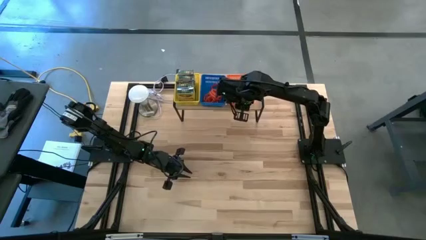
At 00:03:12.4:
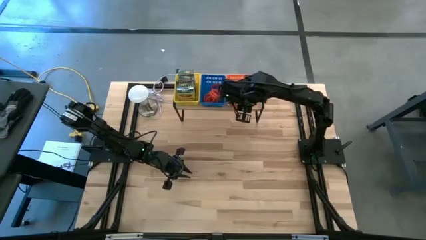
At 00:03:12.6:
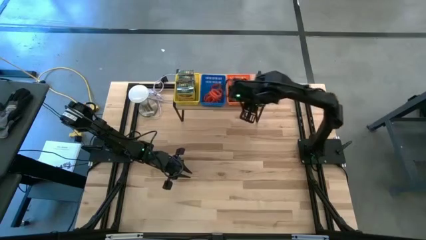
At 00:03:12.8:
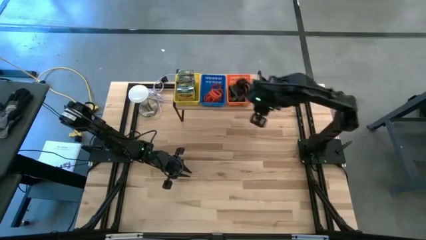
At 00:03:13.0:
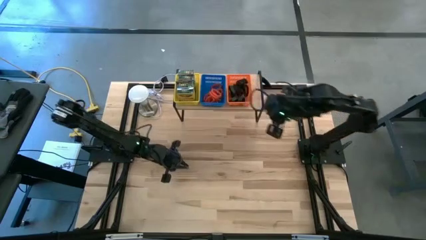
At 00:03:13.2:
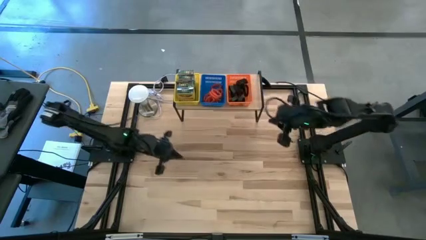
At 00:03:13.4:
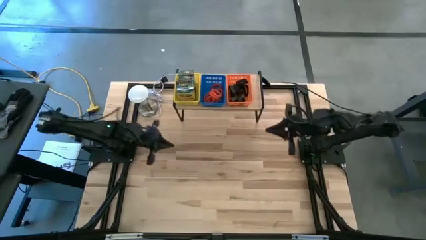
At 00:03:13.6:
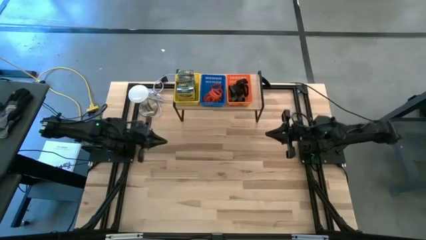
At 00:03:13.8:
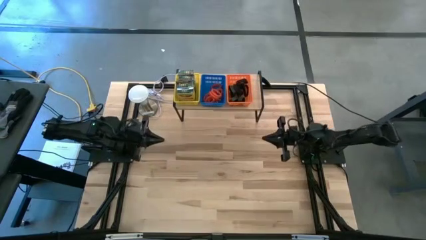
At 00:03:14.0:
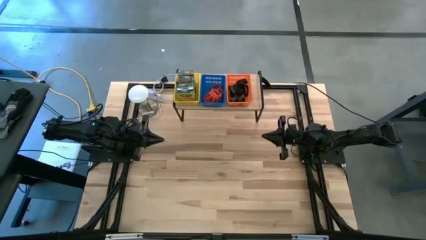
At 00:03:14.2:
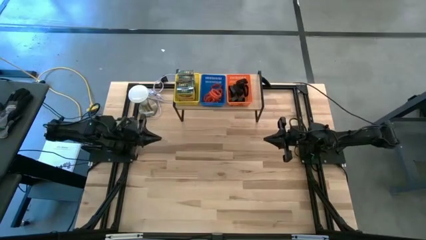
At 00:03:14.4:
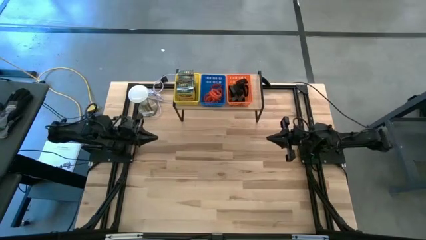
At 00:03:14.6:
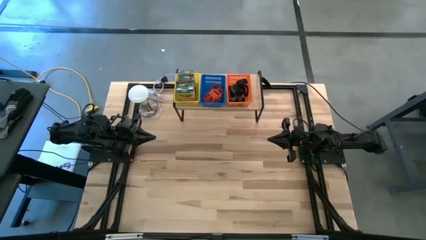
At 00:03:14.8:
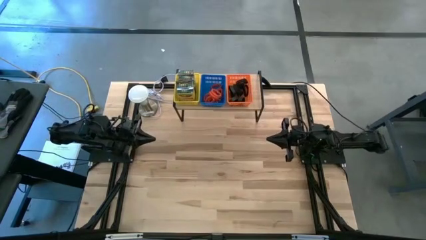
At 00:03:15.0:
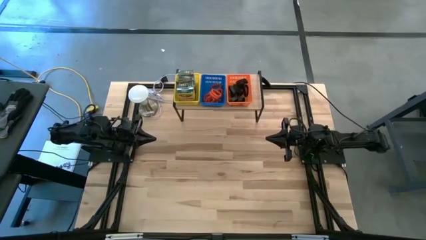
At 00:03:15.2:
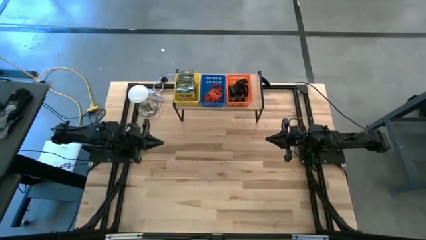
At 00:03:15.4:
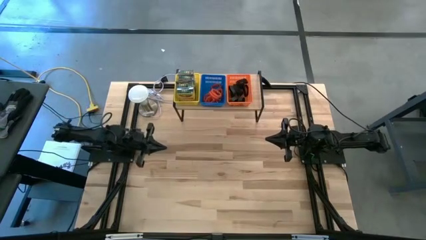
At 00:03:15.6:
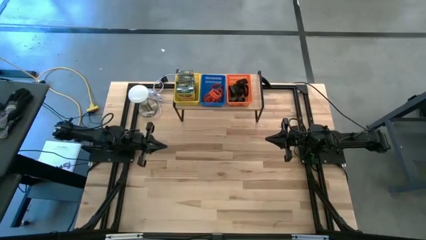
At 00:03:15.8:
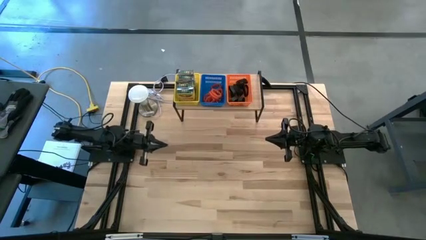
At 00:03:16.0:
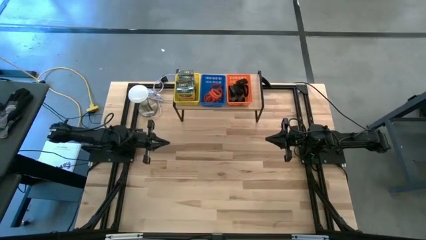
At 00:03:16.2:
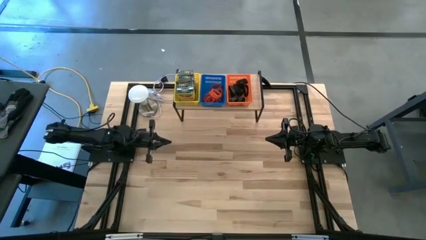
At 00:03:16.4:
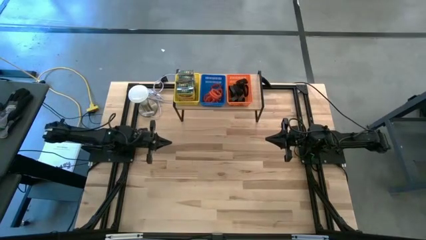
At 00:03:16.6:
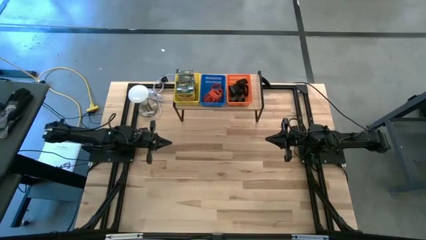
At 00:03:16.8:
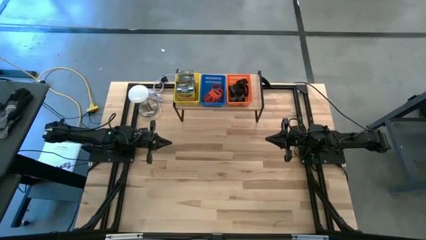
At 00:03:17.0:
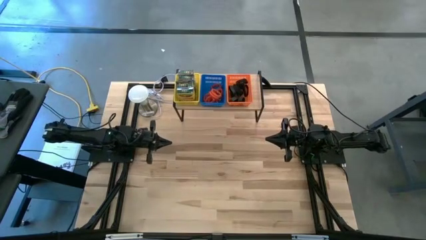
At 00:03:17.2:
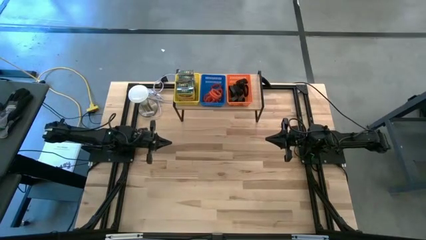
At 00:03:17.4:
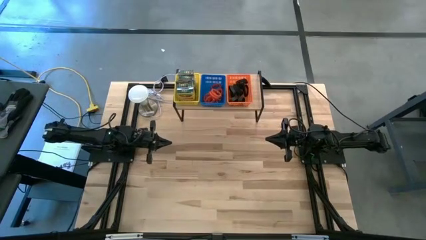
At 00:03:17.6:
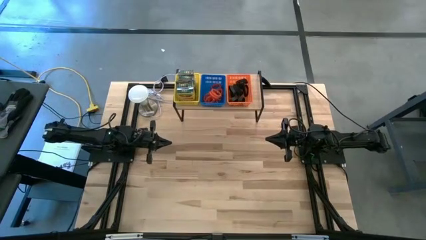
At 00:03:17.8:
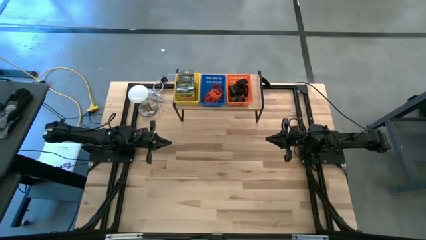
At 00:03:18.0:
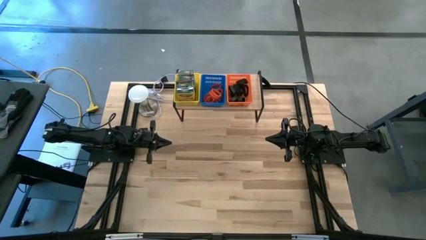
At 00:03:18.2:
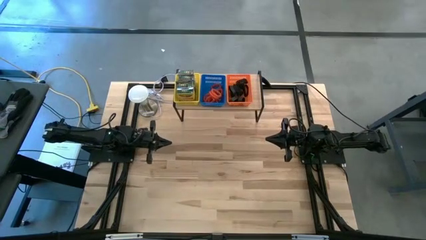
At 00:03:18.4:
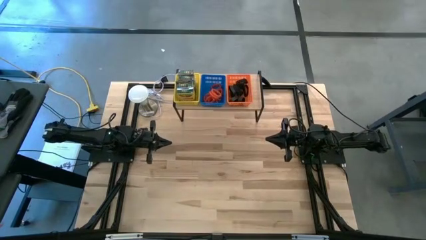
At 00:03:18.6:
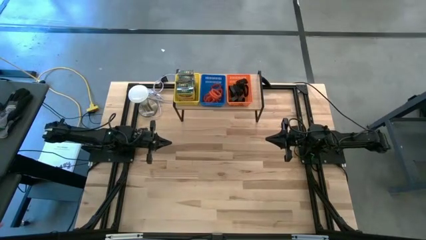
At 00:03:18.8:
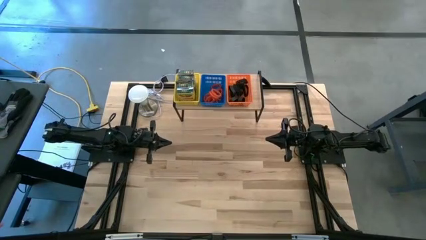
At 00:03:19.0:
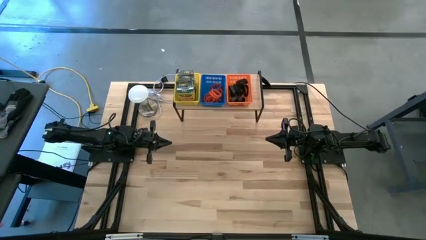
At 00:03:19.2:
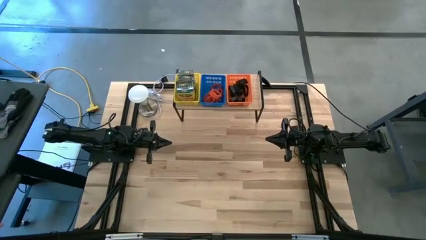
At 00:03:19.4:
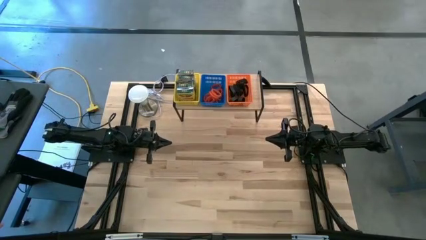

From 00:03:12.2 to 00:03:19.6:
Task: Pick & Place Office Desk Supplies
Return to Home Position

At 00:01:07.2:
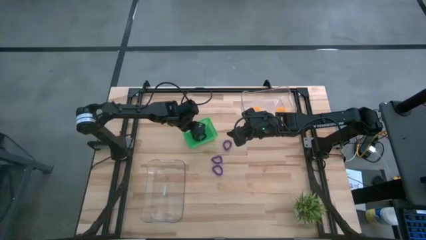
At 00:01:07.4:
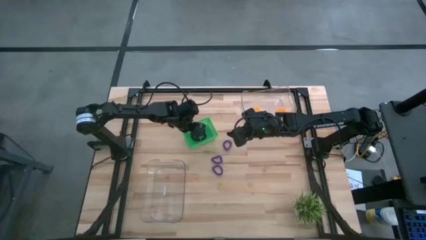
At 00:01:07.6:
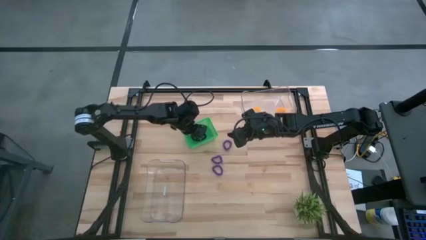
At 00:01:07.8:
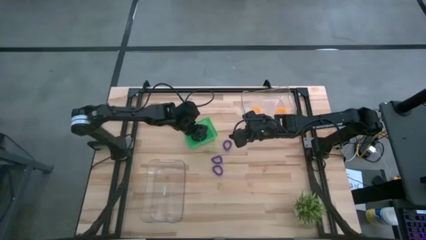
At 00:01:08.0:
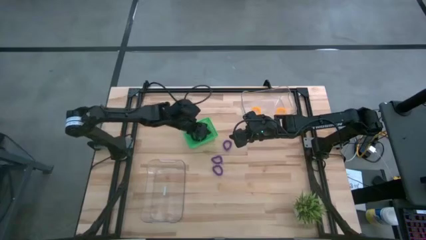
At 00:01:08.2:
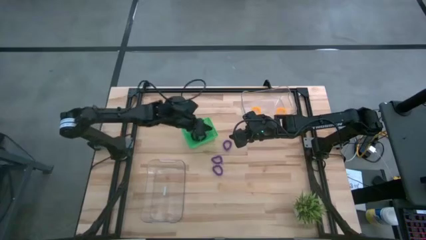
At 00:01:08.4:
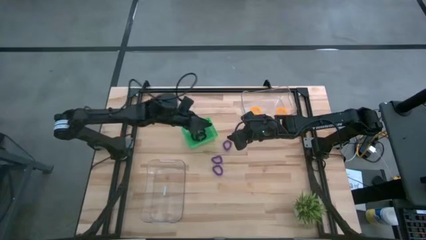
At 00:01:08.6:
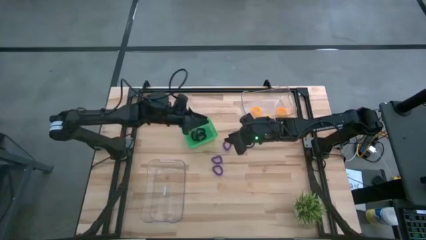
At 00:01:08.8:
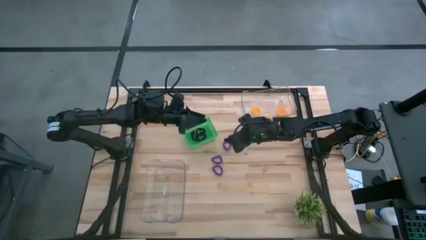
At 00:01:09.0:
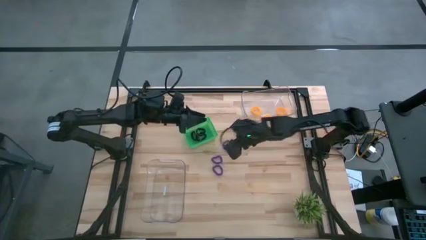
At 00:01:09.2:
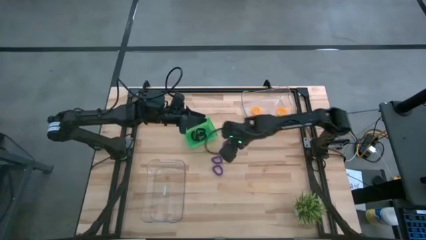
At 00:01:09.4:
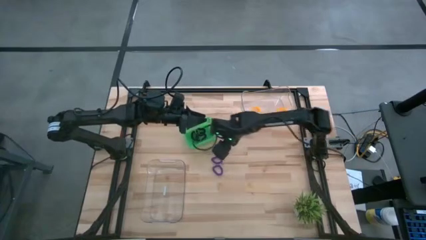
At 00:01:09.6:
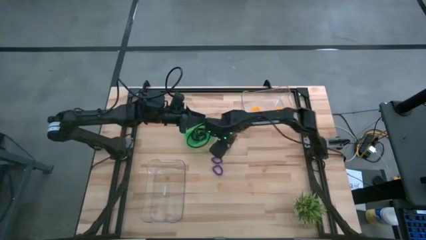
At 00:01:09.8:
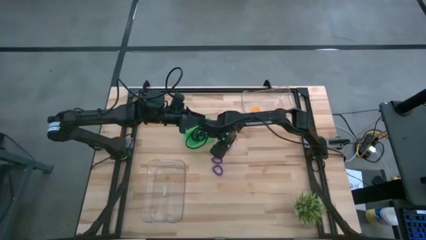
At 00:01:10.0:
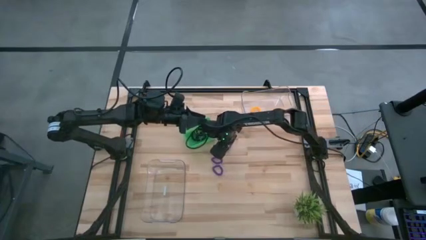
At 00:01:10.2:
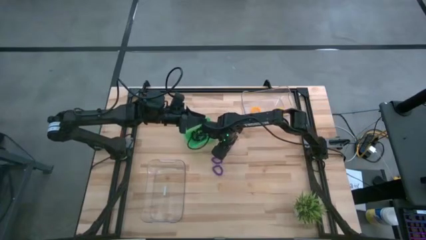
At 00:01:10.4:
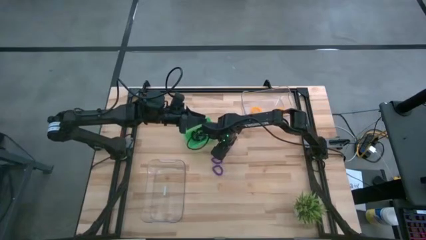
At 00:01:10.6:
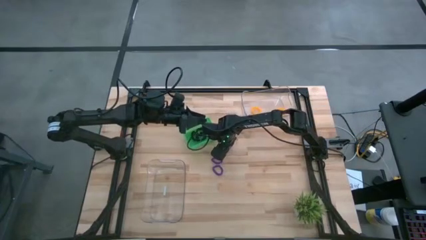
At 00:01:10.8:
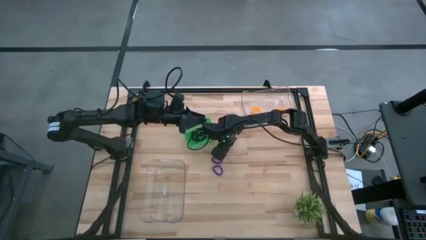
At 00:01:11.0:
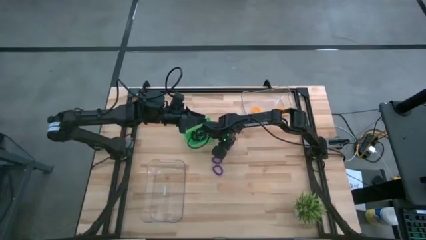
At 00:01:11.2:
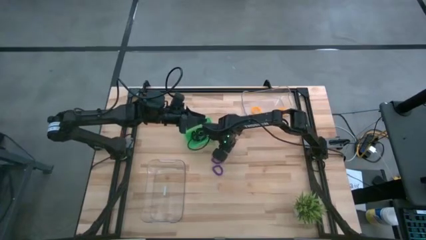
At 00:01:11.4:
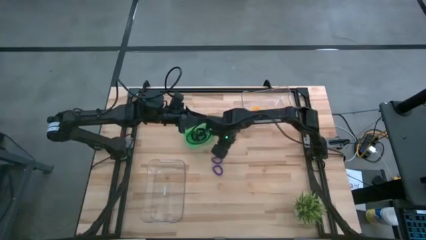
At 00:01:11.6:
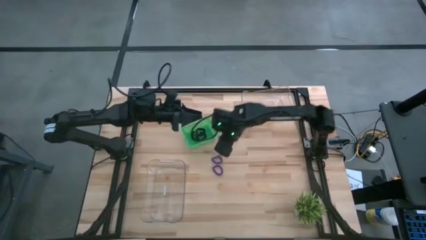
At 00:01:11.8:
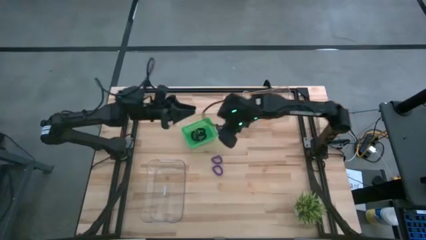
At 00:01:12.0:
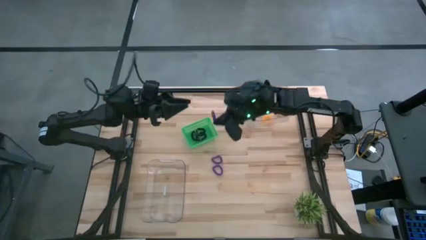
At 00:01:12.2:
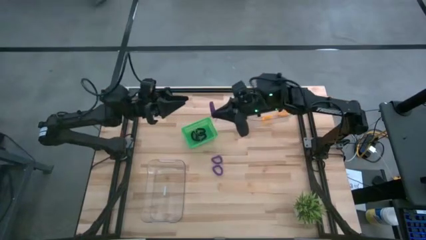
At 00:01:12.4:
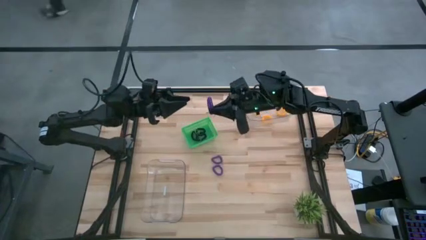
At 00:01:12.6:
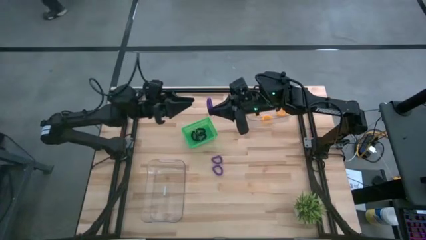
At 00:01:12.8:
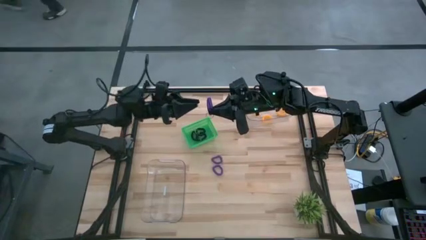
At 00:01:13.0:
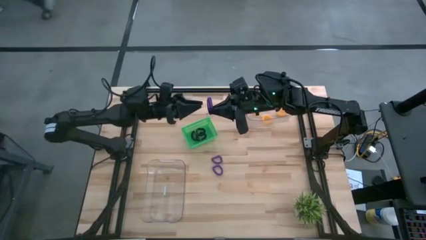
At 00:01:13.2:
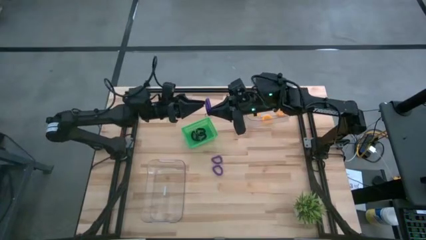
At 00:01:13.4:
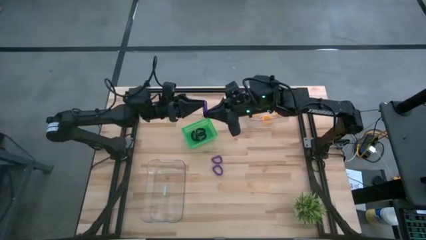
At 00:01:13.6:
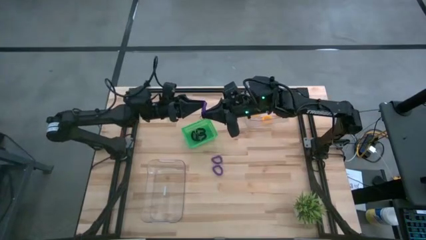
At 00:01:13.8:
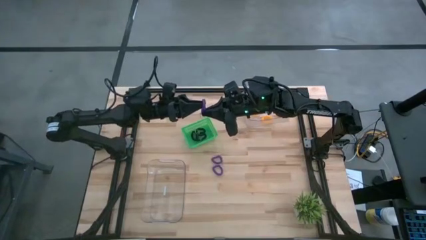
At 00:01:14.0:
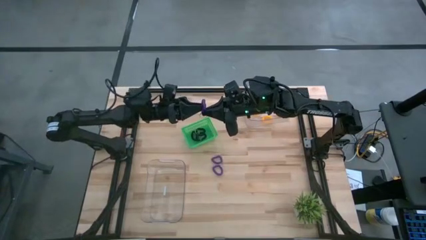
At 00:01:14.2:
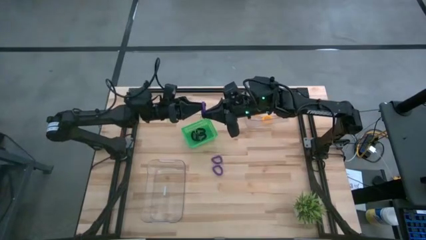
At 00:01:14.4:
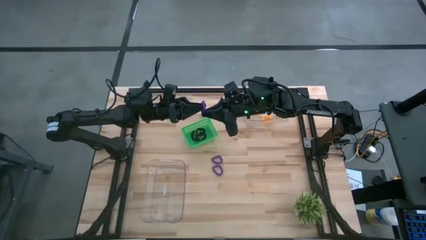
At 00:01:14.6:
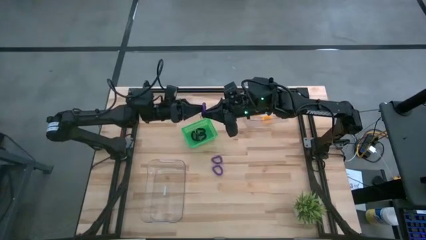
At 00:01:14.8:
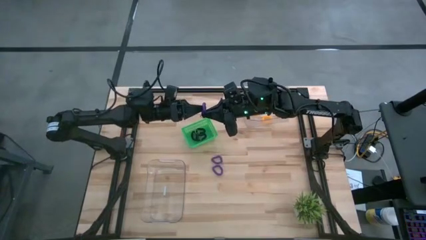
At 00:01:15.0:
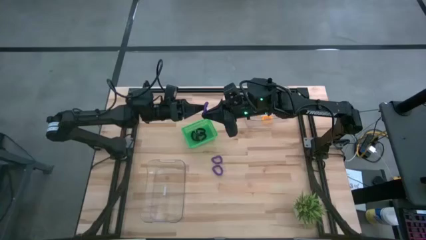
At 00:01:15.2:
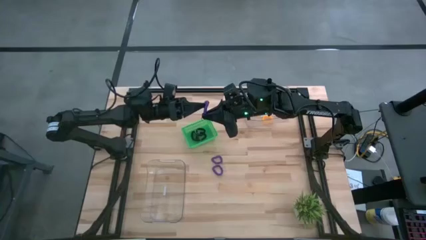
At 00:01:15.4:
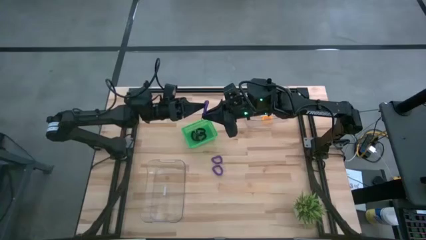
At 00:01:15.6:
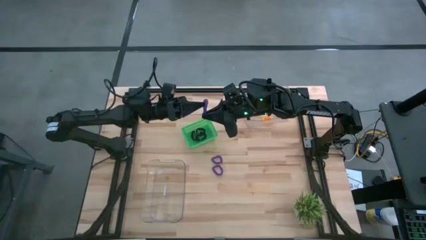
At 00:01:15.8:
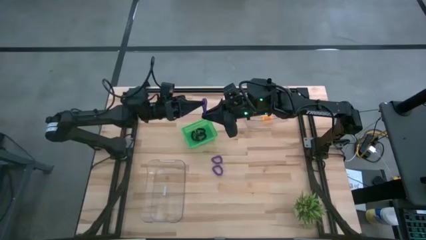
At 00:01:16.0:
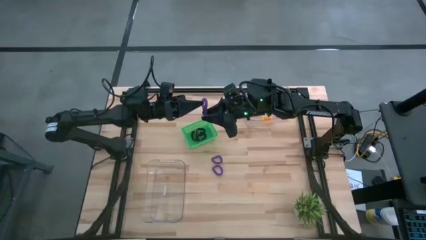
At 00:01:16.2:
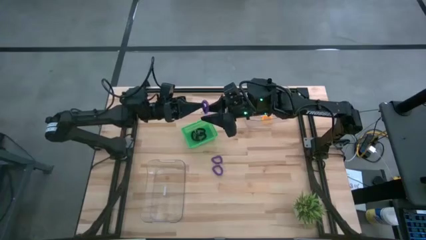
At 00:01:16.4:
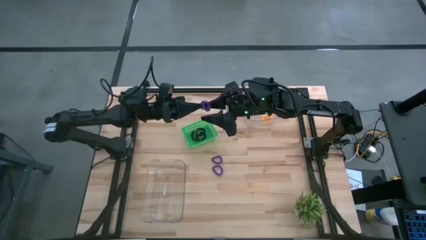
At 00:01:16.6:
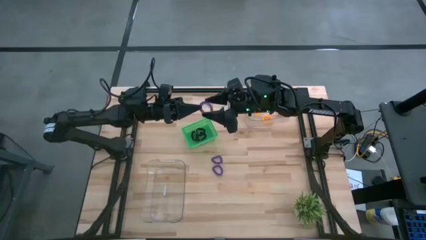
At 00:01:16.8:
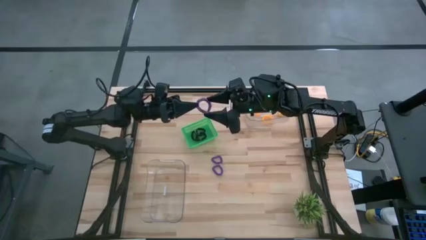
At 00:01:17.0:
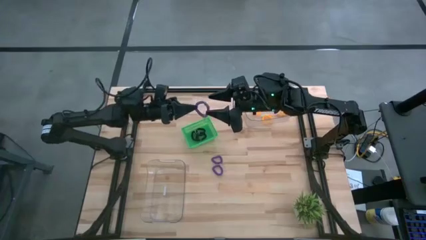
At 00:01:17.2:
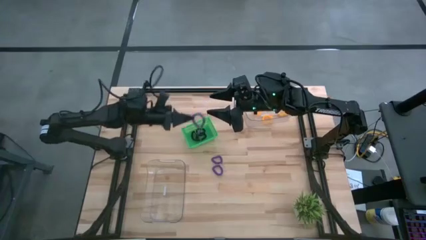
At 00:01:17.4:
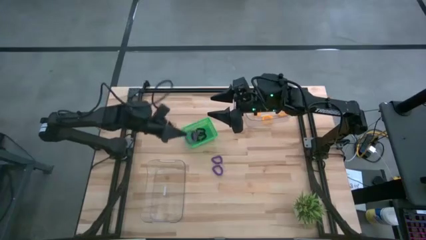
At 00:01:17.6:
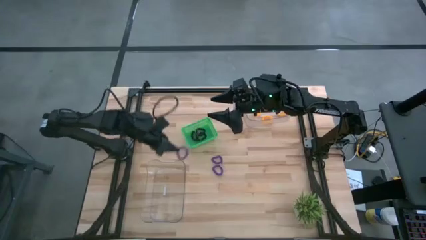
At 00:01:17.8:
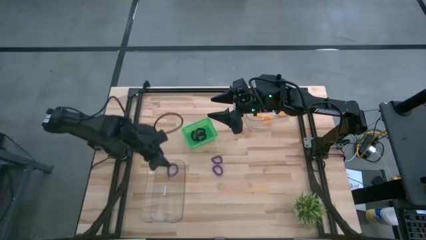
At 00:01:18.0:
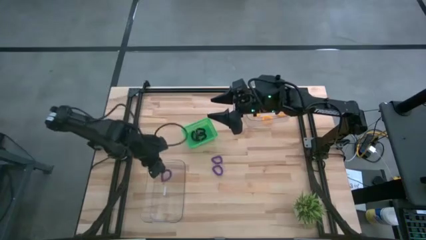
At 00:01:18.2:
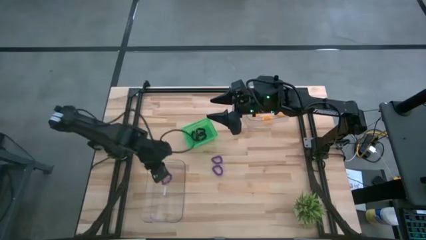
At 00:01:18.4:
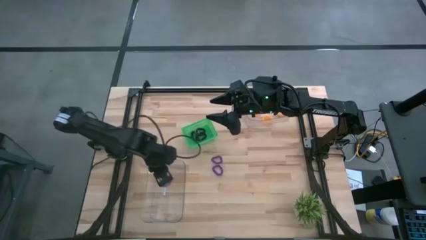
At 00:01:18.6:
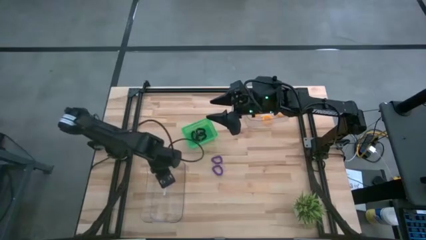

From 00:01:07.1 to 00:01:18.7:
Task: Sort spring keychains
Put the top purple spring keychain into the bottom transparent bin
